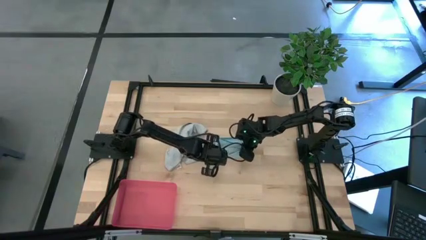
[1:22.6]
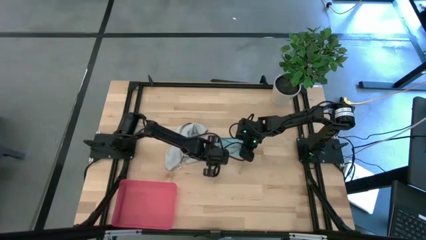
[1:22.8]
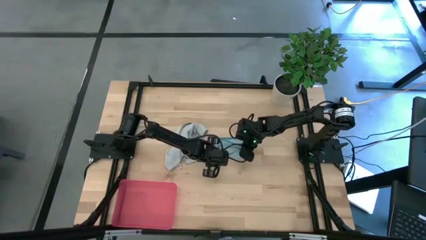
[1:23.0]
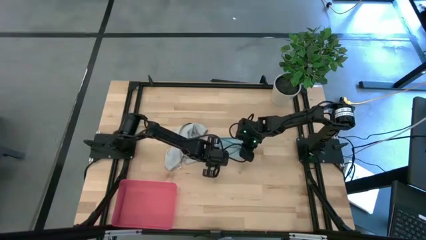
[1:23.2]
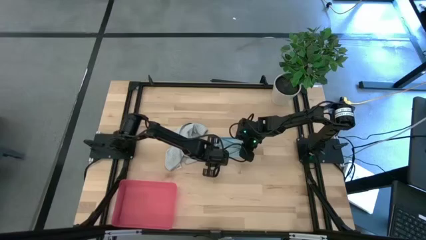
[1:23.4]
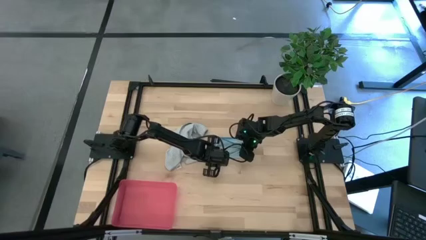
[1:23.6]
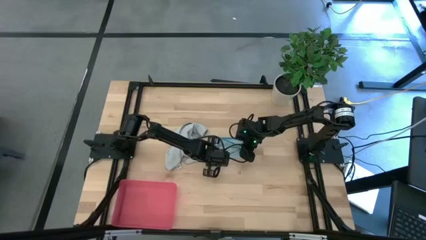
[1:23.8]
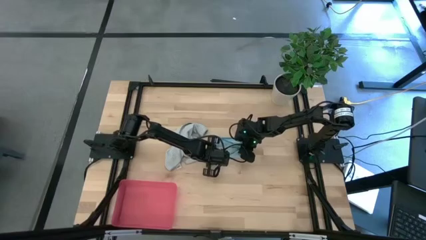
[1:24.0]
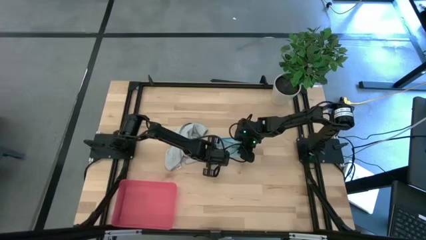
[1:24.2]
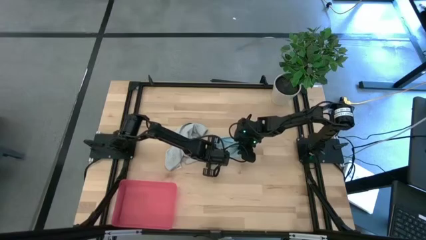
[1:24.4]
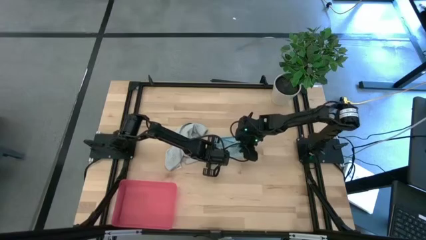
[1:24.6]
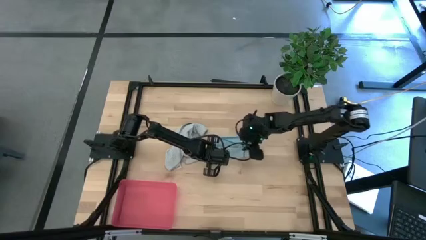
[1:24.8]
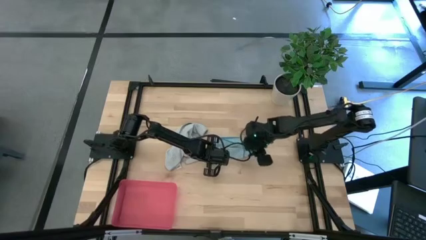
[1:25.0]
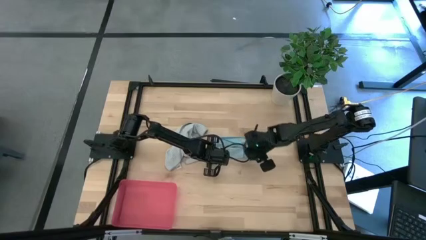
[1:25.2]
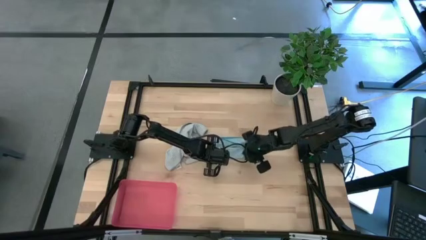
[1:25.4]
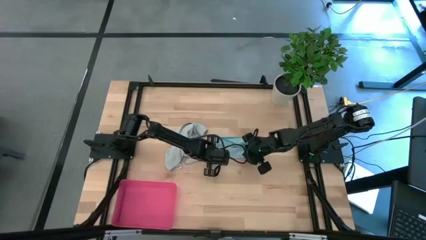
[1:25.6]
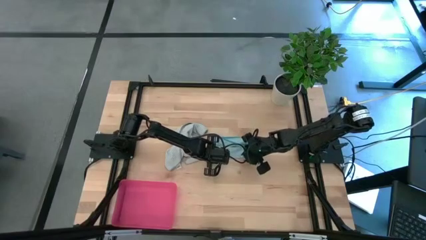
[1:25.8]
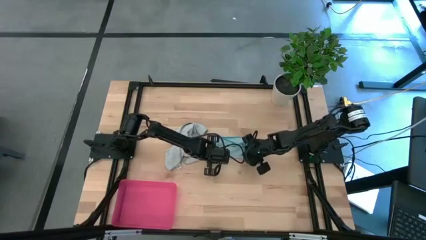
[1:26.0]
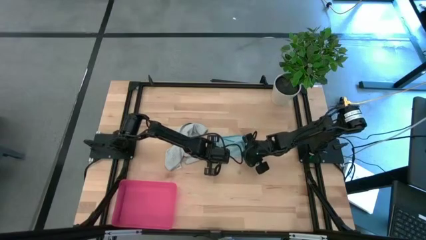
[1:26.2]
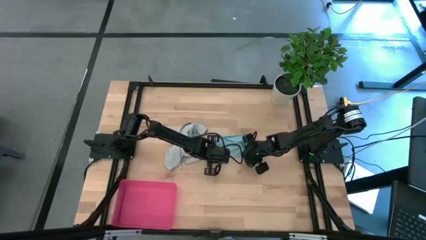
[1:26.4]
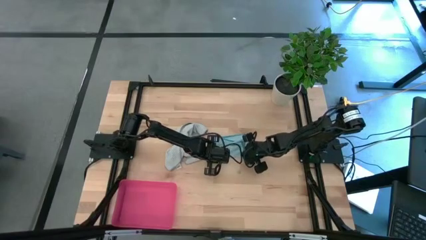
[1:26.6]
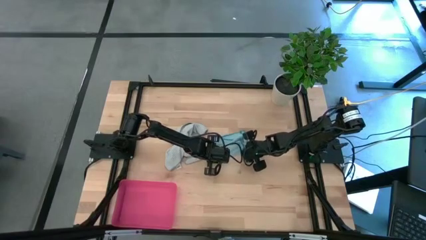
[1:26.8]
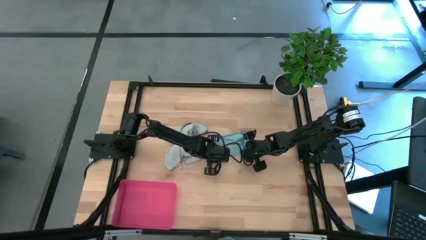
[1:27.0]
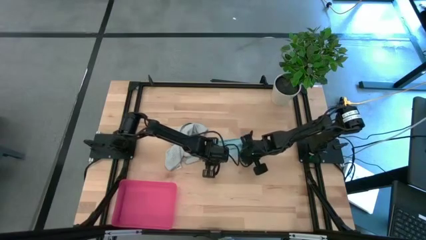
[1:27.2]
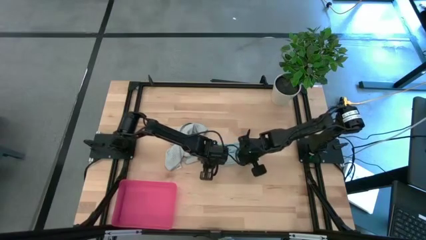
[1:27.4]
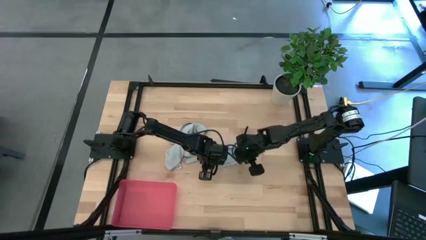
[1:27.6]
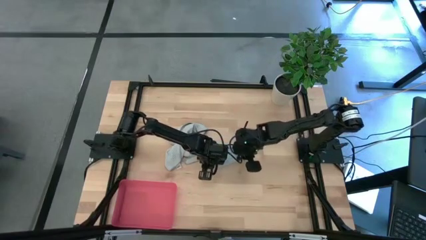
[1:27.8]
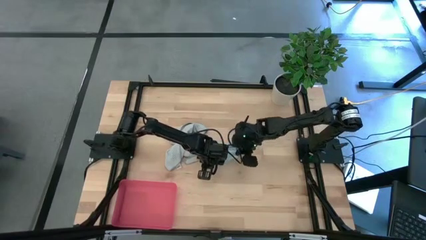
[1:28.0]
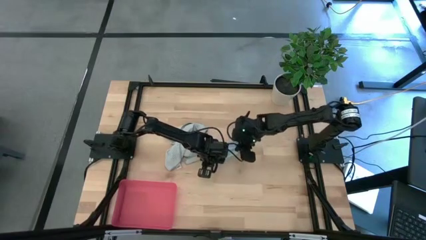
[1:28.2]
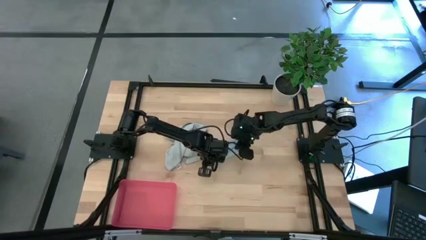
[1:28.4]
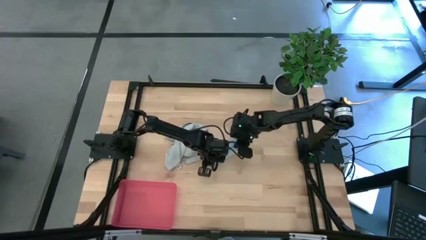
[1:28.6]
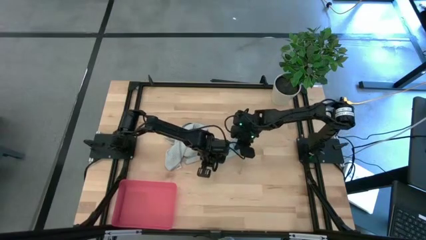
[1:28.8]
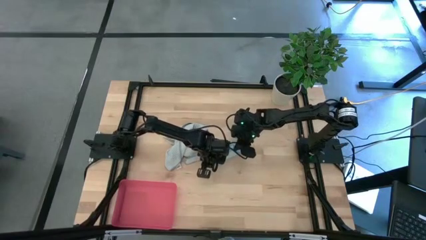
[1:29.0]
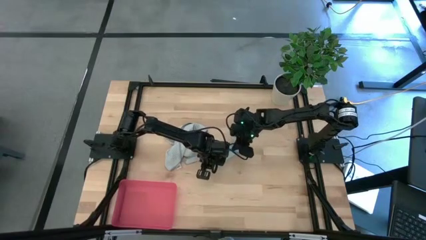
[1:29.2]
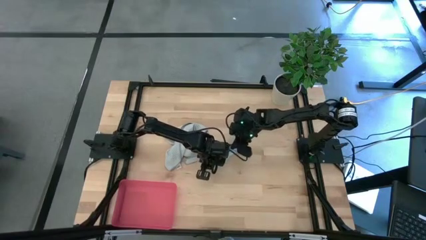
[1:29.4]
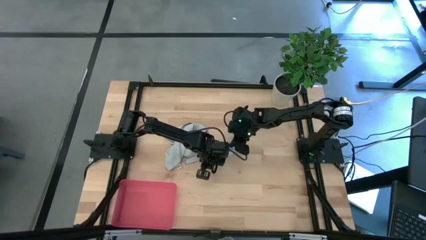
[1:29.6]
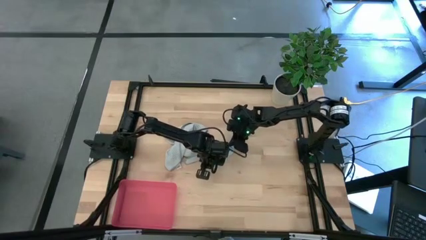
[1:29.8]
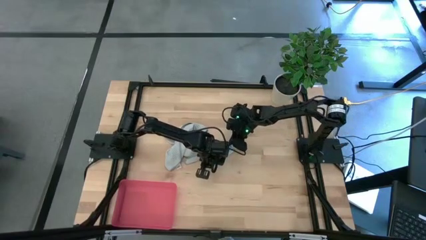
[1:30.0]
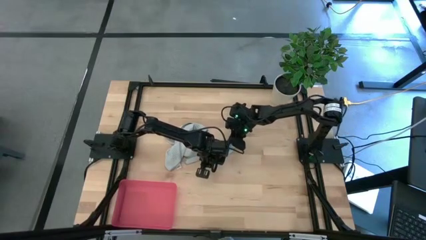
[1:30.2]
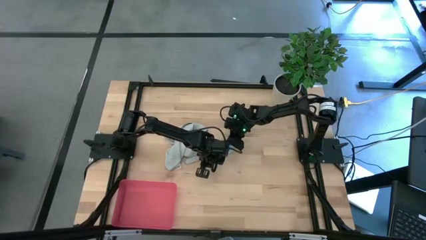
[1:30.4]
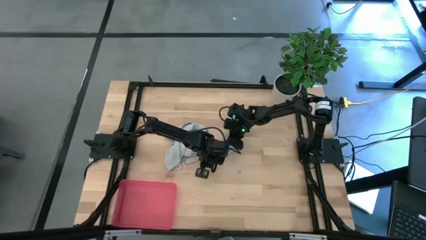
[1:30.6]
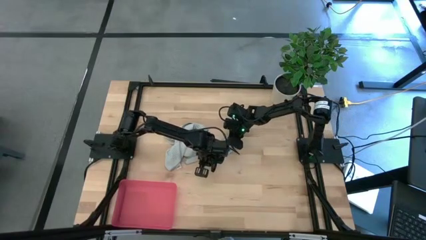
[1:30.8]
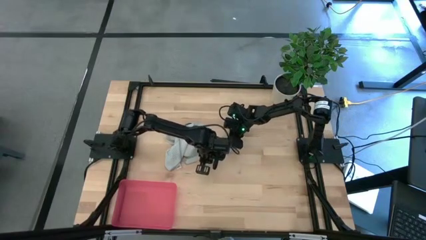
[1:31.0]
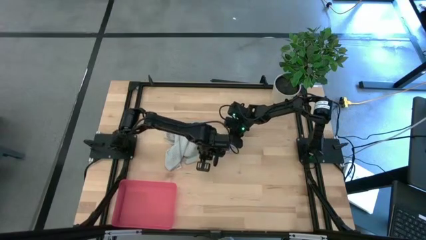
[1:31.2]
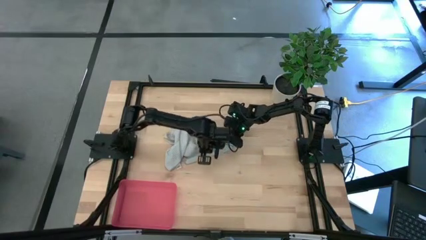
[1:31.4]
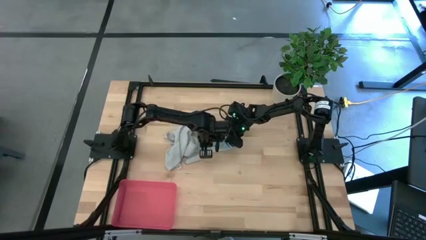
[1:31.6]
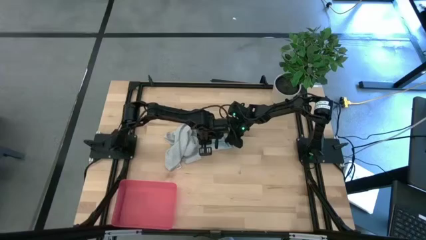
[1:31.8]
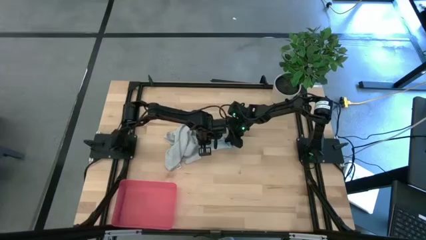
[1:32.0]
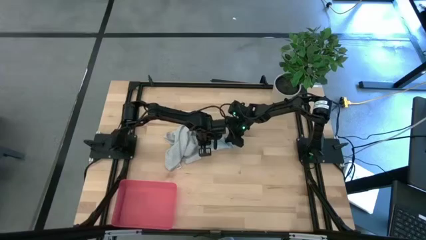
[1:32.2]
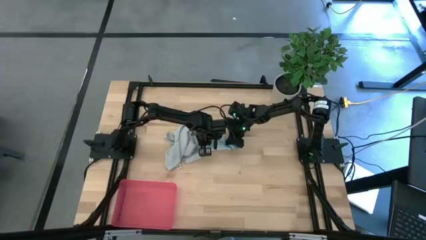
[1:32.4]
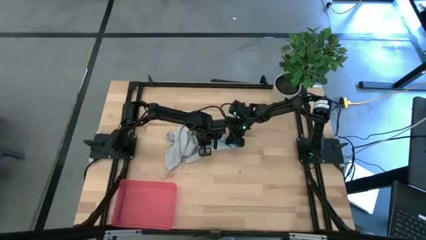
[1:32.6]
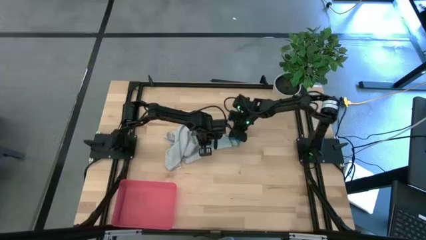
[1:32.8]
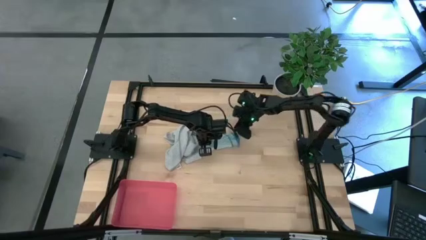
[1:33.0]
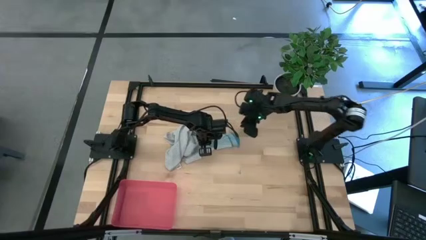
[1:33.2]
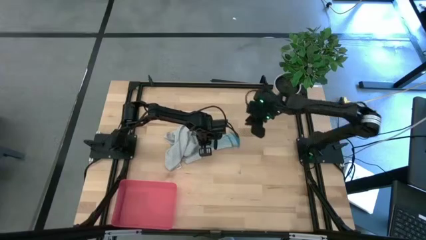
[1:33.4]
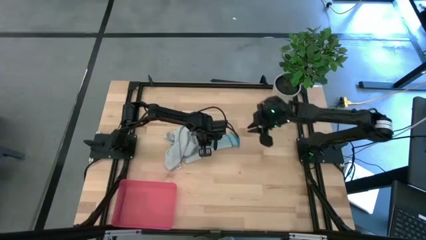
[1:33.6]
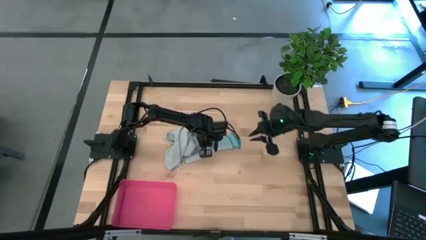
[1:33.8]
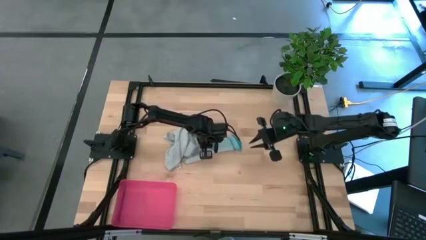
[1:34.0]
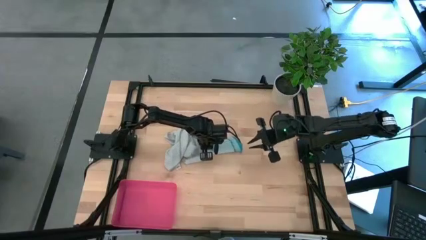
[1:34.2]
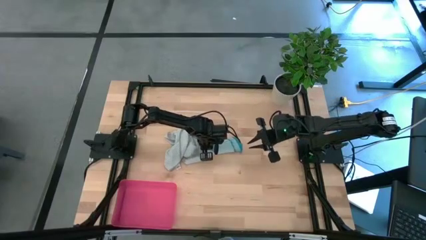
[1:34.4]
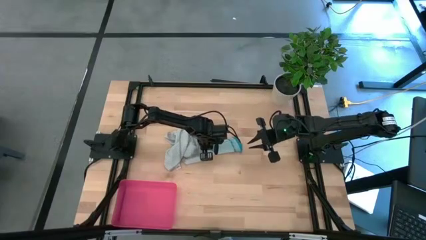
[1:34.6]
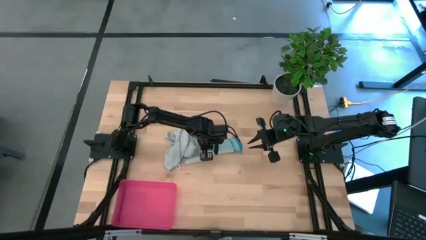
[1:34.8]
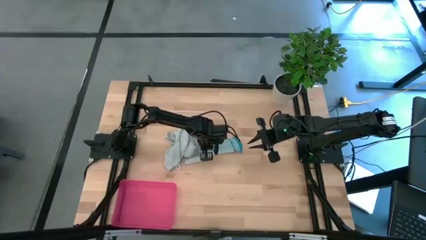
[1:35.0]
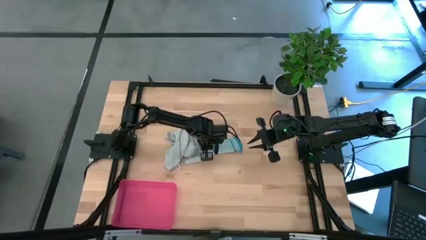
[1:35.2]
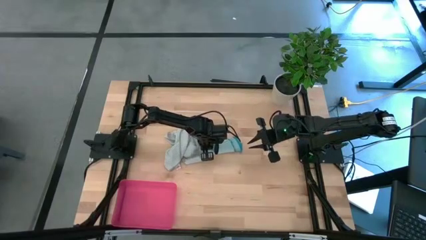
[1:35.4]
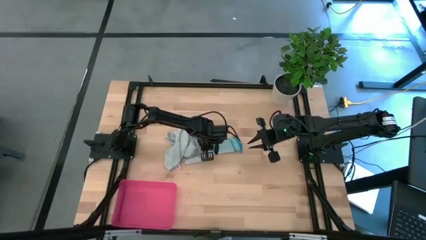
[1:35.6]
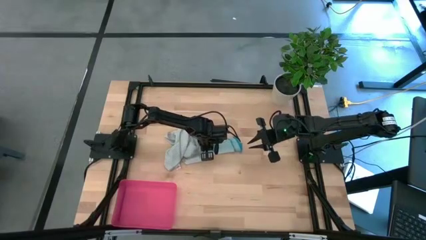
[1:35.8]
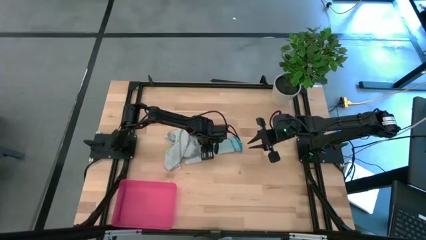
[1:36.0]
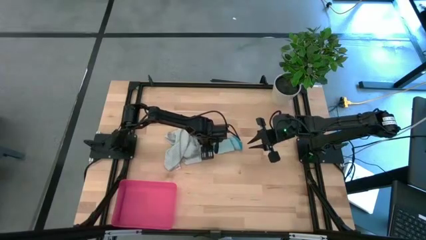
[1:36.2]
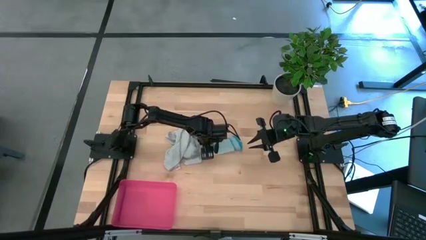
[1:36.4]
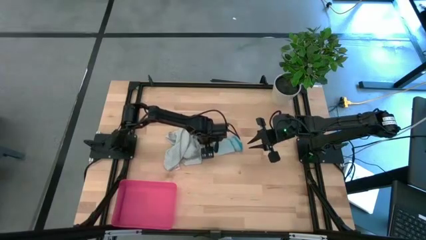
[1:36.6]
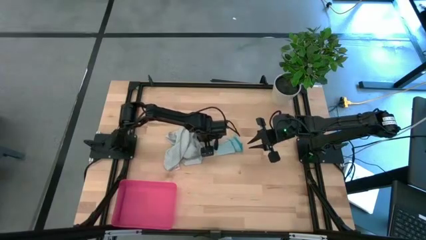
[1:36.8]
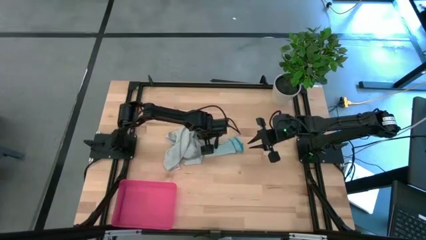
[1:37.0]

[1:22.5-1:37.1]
Task: Roll microfiber towels into tight, uniform cylinder then place into a basket
Roll the blue towel
